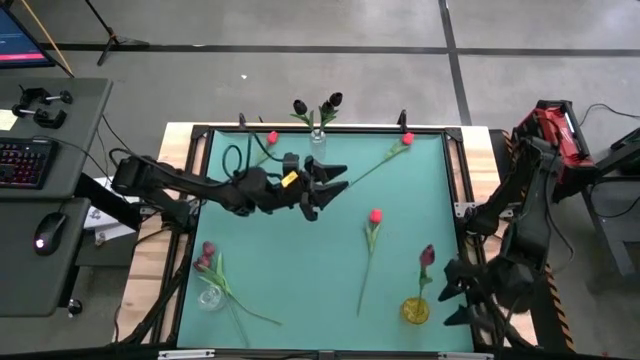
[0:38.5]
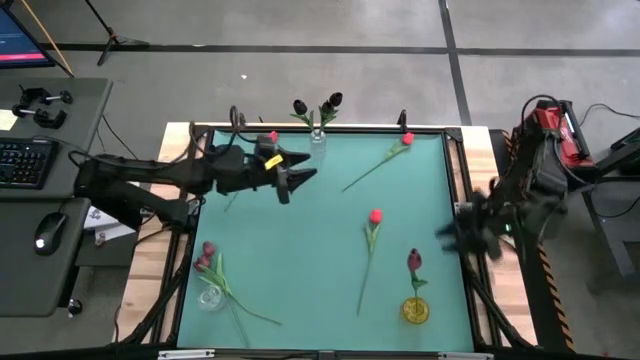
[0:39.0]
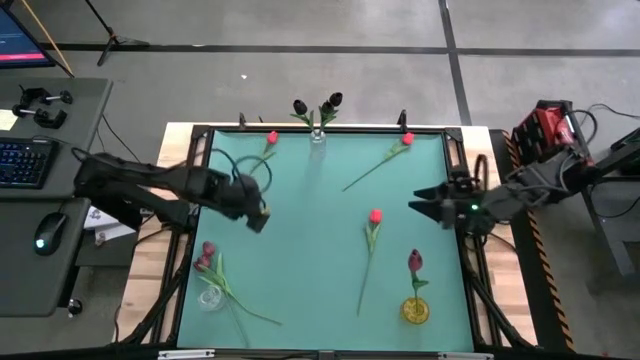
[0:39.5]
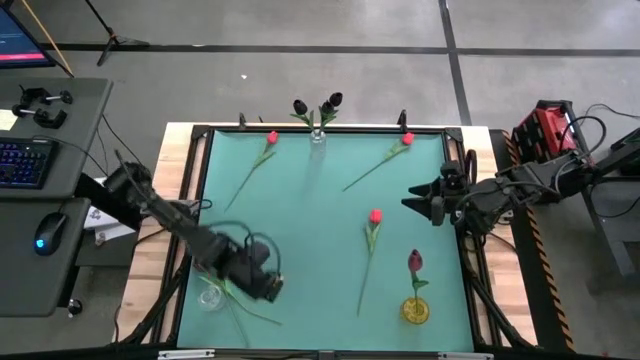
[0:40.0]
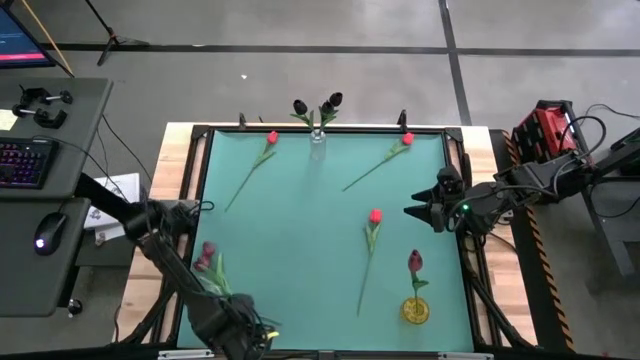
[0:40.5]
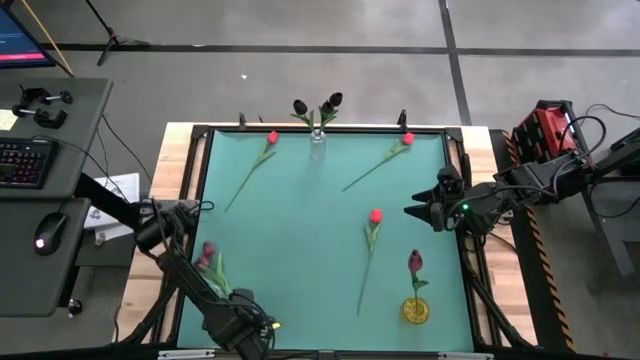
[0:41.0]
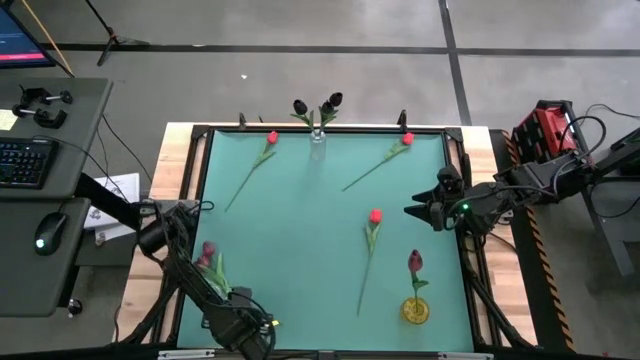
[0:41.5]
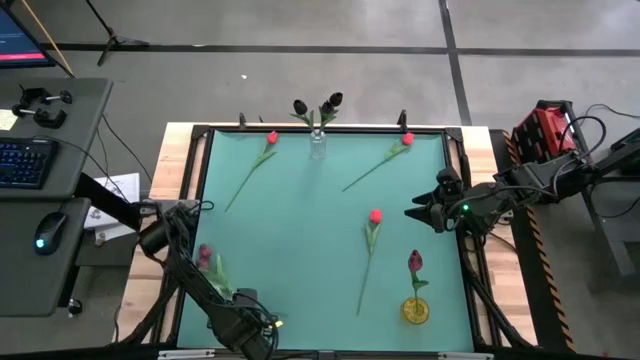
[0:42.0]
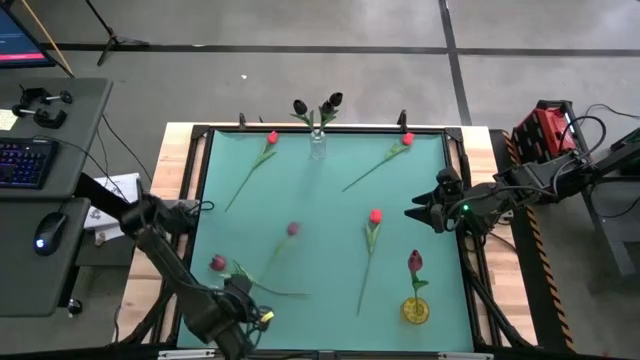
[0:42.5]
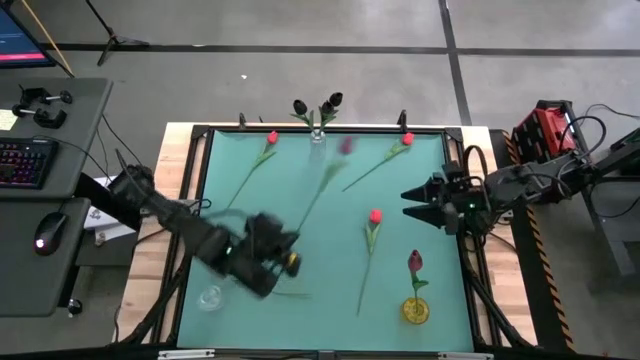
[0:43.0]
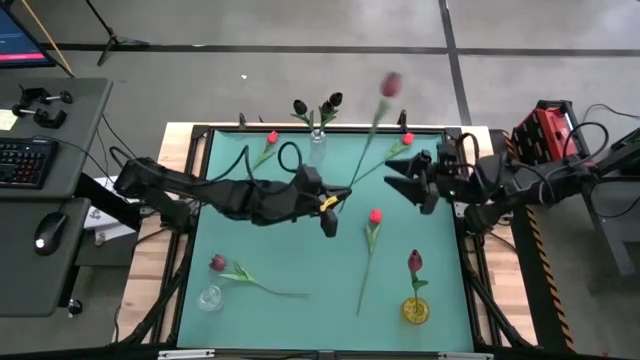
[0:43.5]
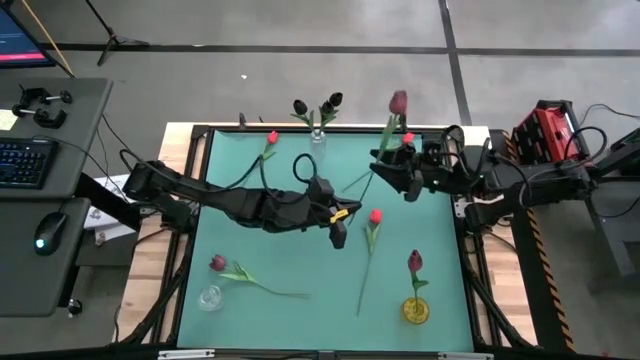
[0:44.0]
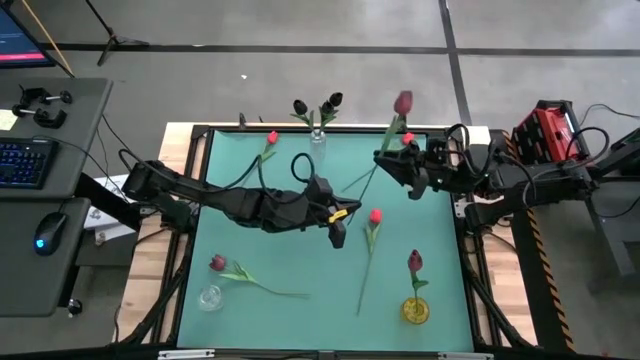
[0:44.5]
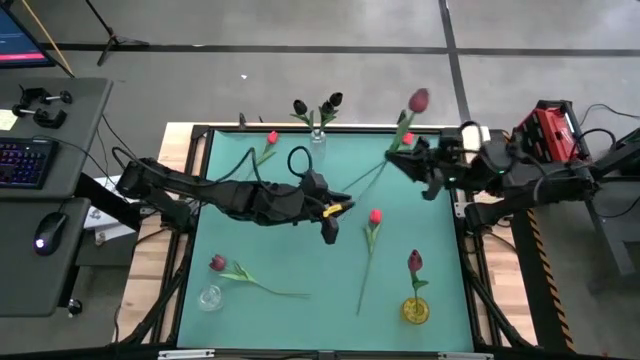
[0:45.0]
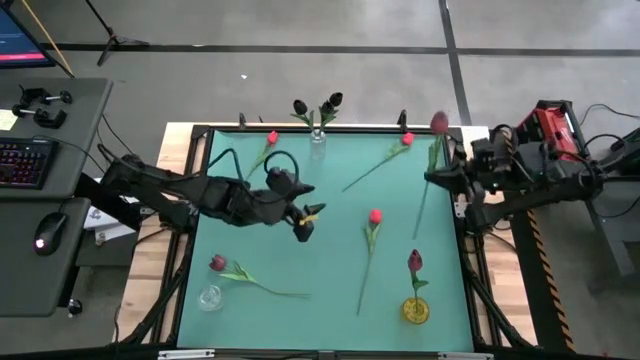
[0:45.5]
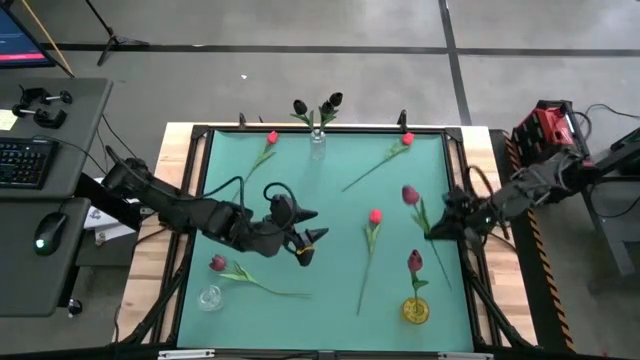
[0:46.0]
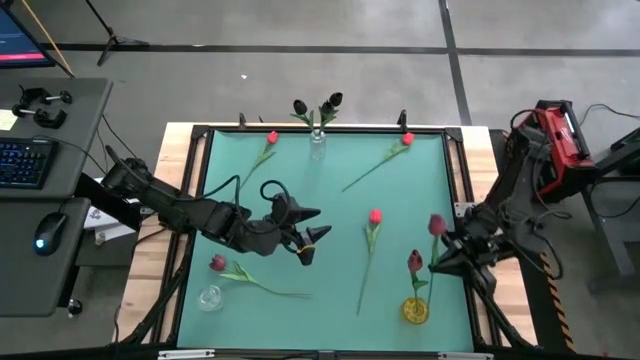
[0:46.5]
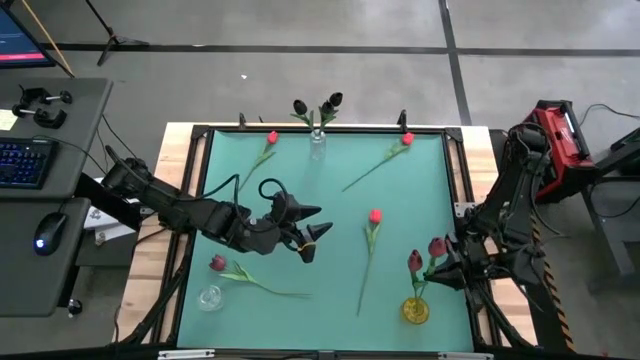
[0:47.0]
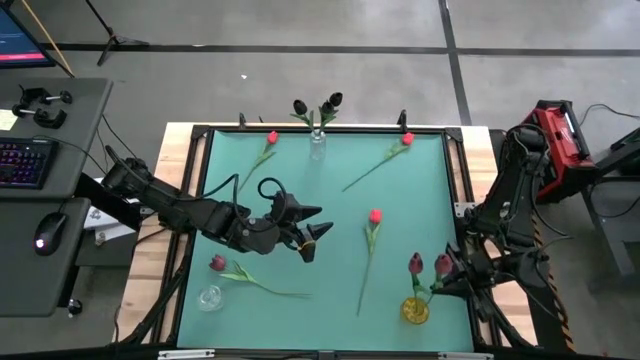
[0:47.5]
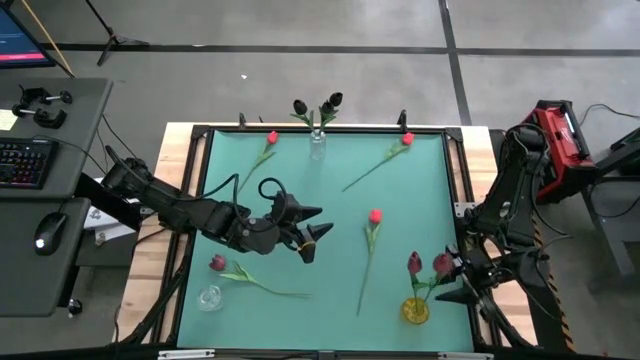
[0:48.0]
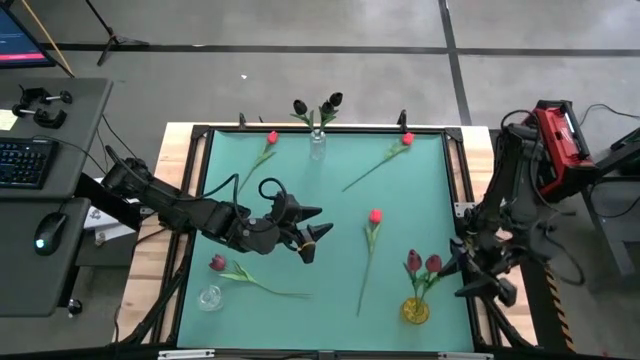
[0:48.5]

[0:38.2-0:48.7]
Task: Sort flowers into vase by color
Put the right dark red tulip into the yellow vase

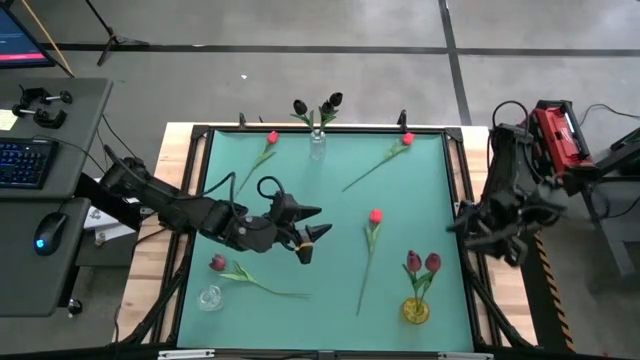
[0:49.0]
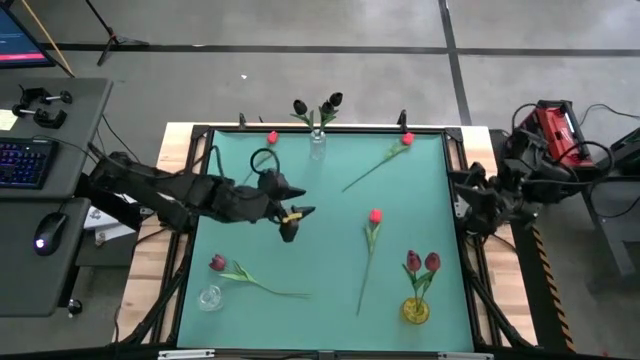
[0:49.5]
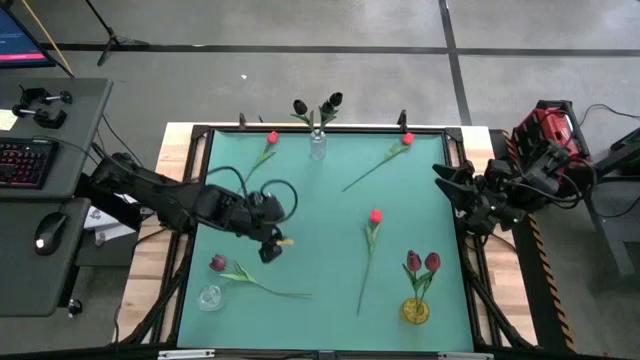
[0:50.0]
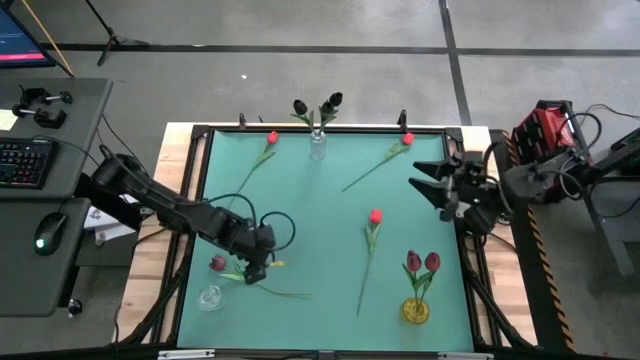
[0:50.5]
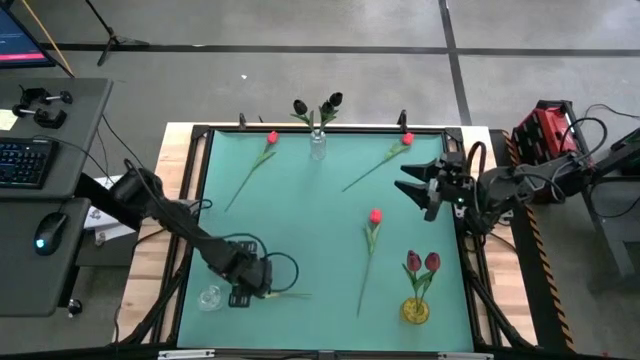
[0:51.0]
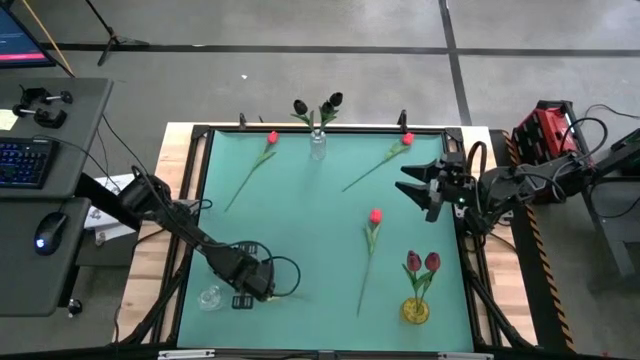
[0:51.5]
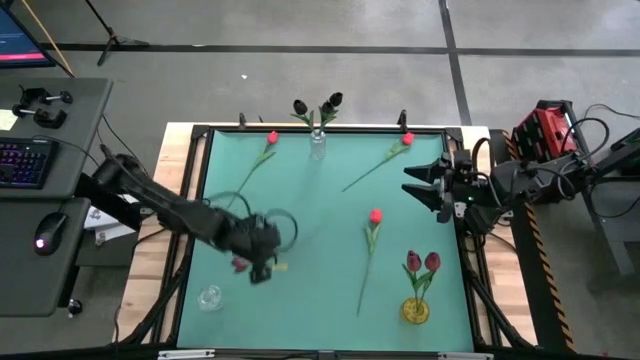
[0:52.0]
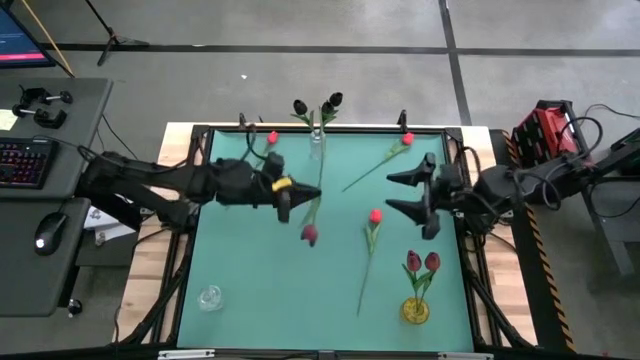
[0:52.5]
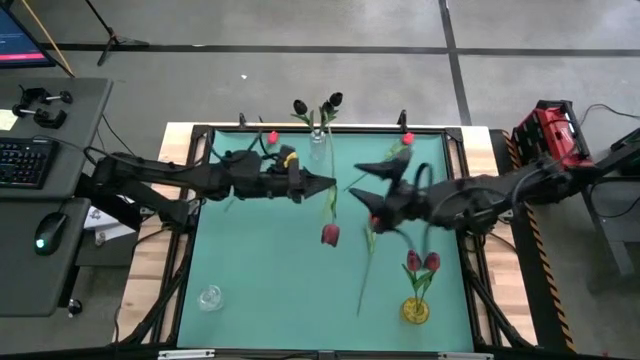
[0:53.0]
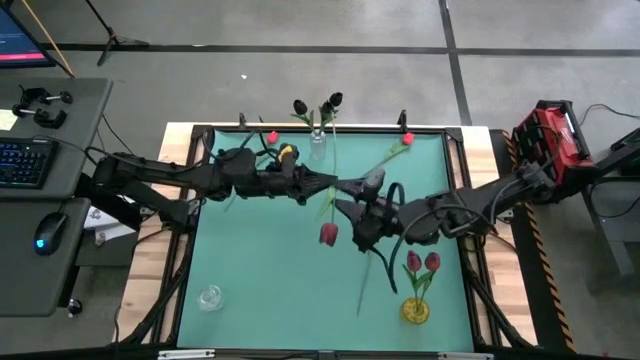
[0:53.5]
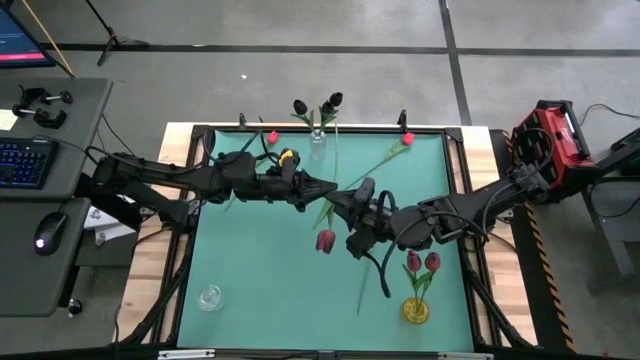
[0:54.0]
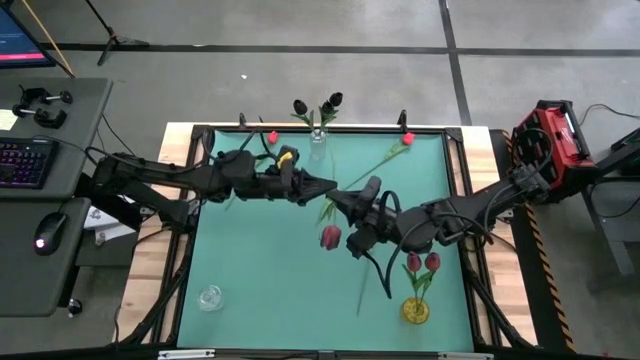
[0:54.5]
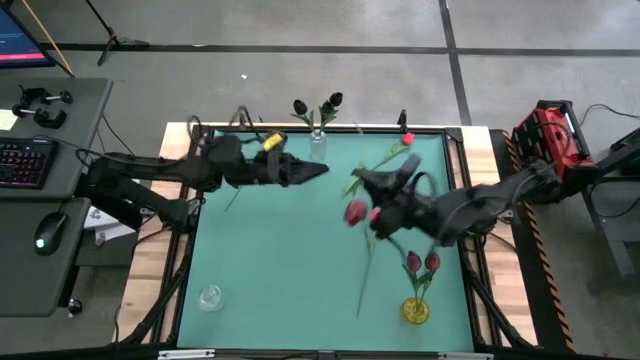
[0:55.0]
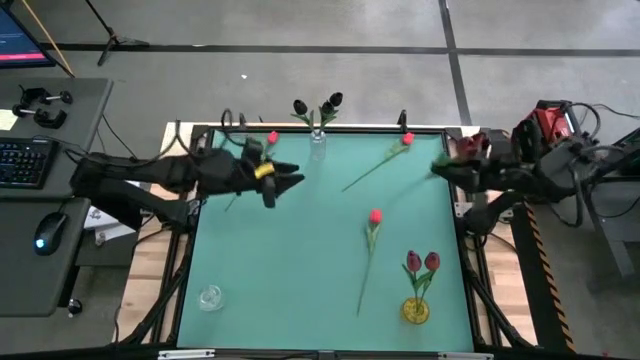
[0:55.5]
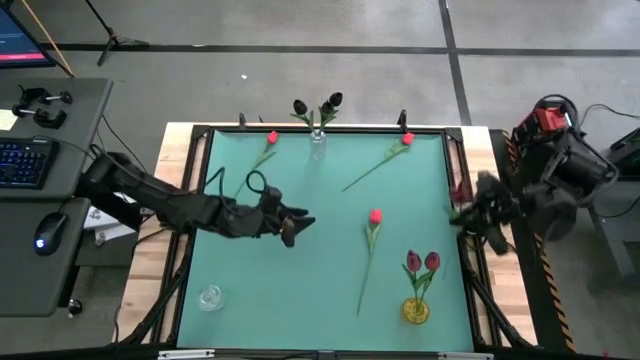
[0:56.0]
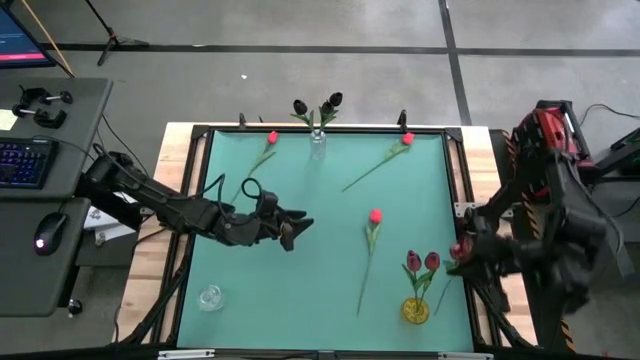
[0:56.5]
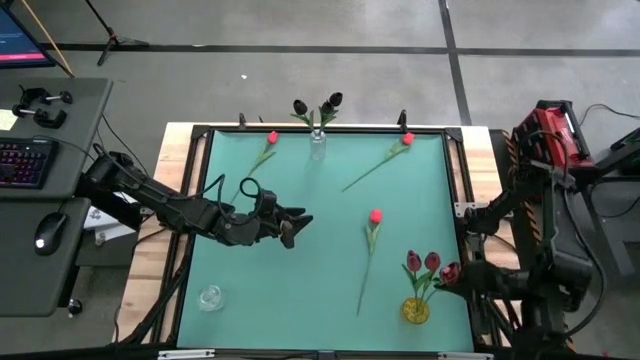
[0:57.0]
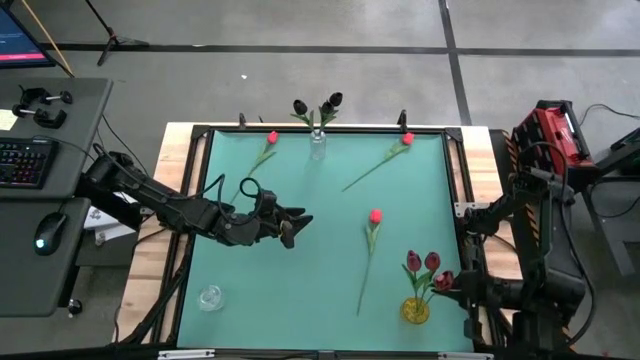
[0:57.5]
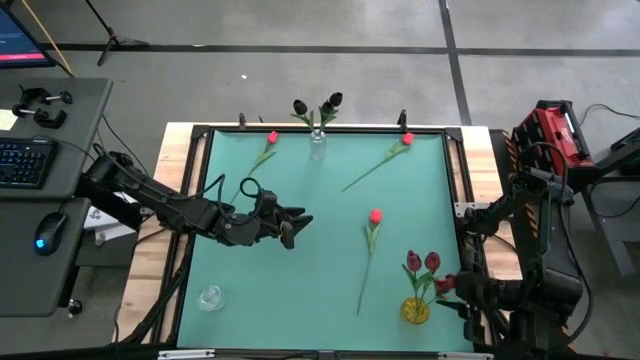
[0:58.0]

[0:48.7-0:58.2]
Put the dark red tulip into the yellow vase
